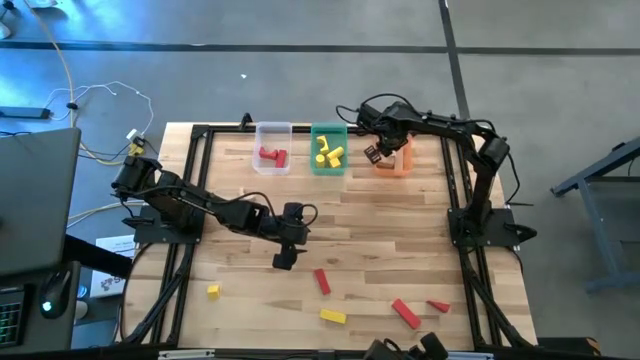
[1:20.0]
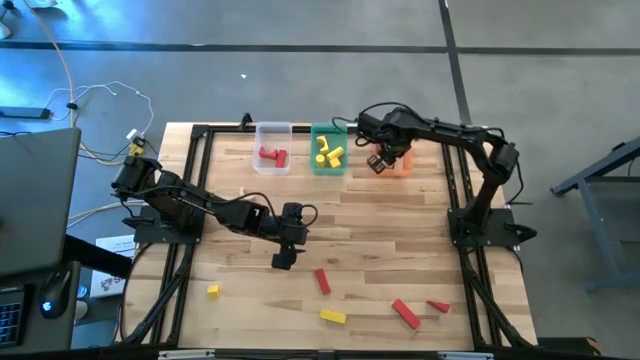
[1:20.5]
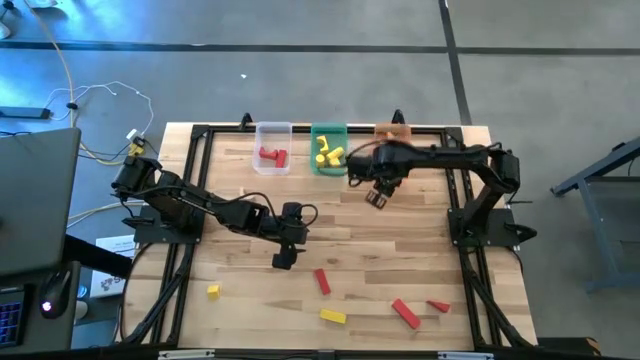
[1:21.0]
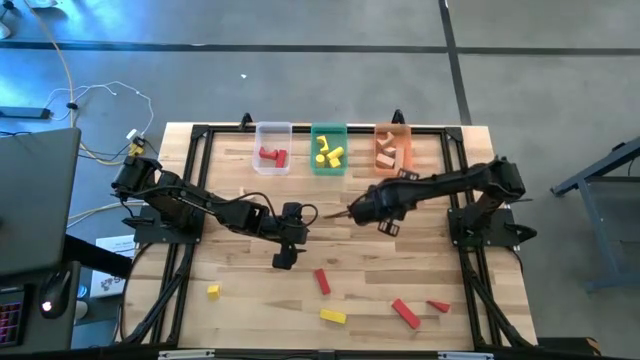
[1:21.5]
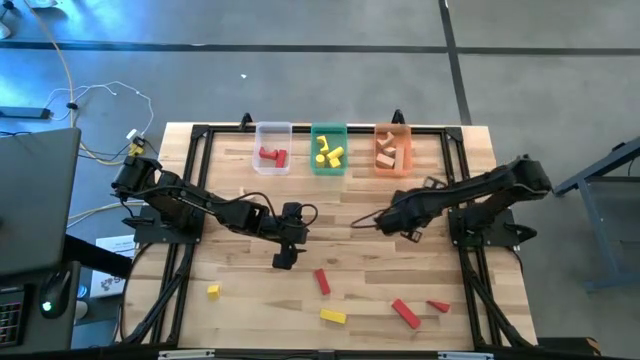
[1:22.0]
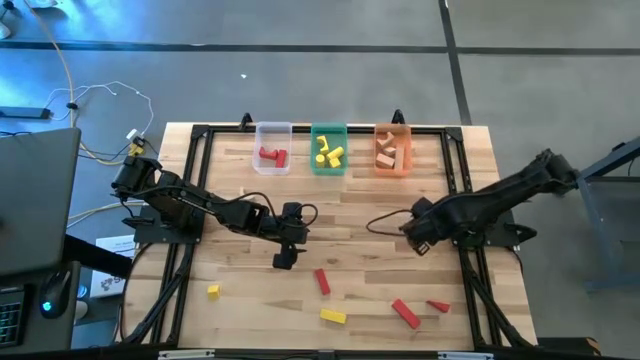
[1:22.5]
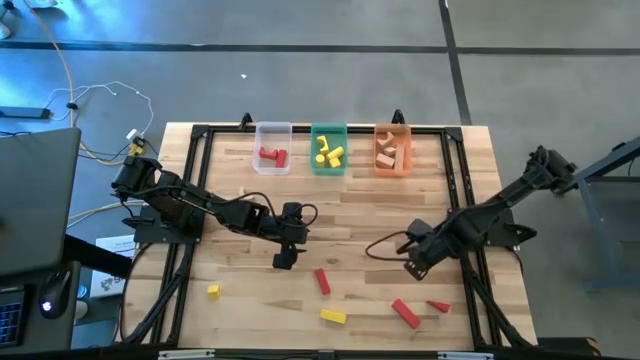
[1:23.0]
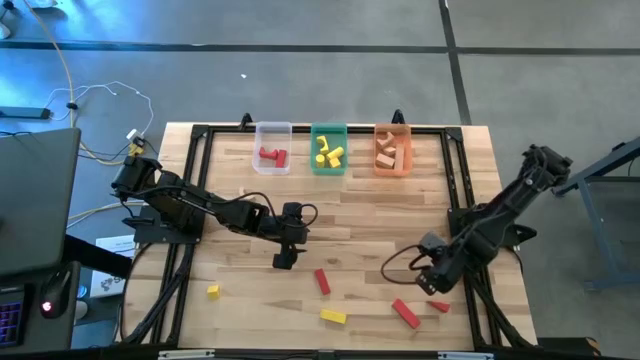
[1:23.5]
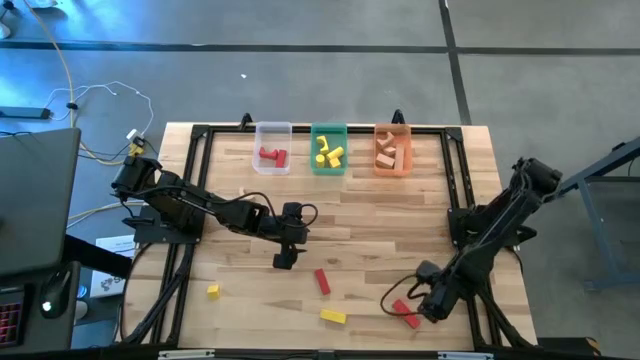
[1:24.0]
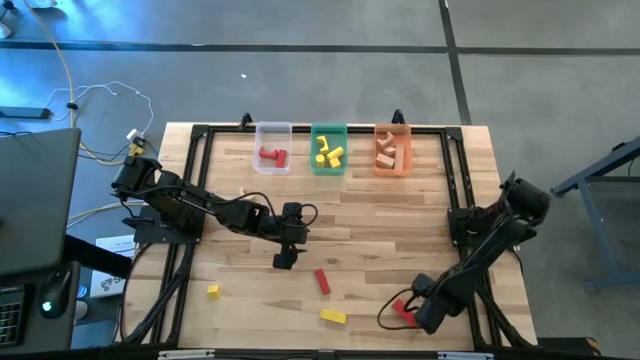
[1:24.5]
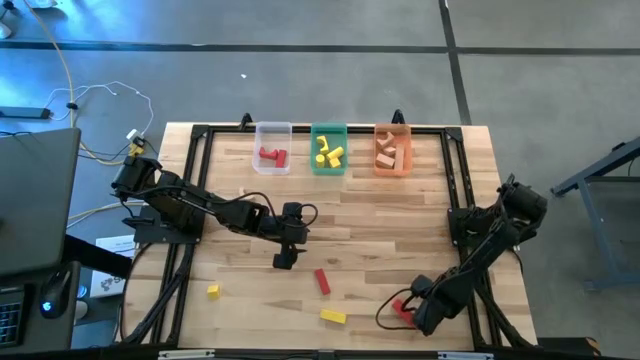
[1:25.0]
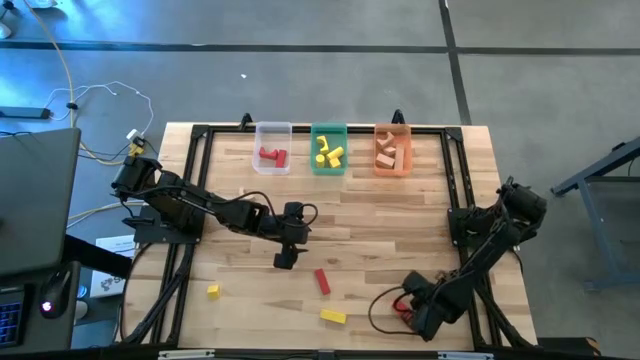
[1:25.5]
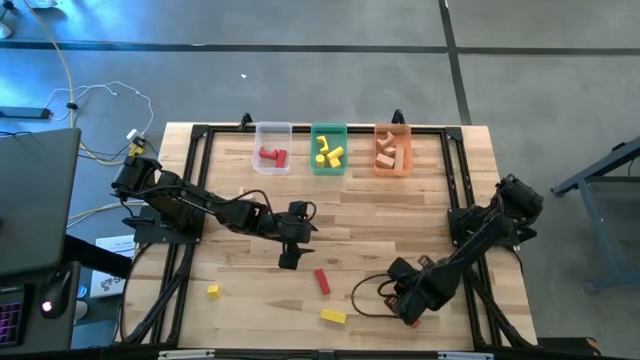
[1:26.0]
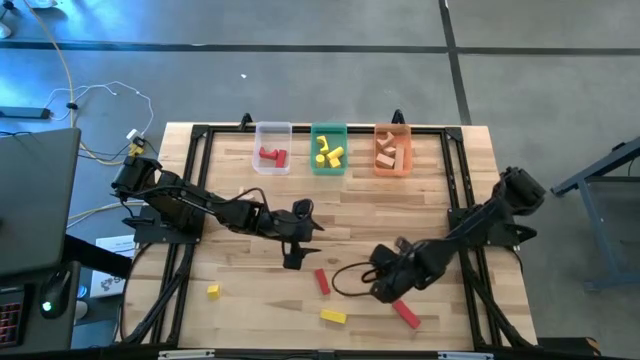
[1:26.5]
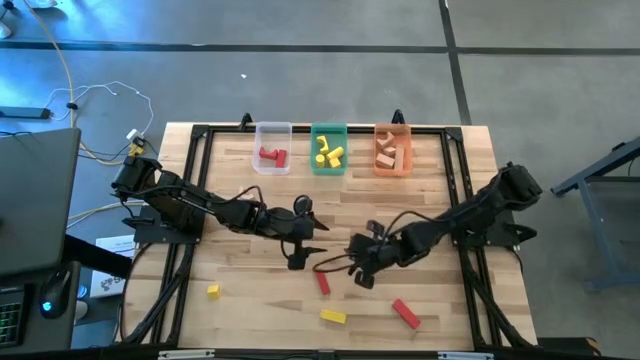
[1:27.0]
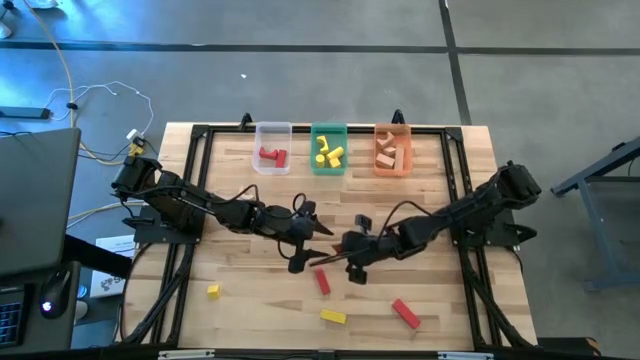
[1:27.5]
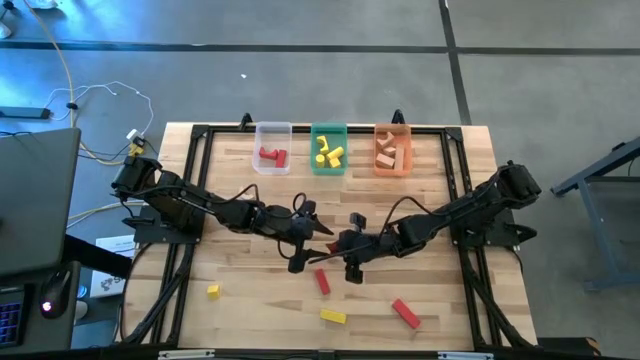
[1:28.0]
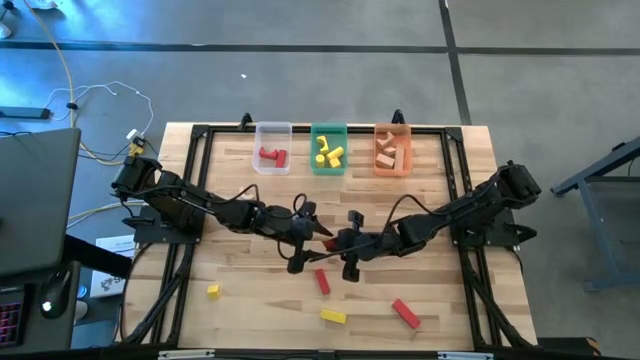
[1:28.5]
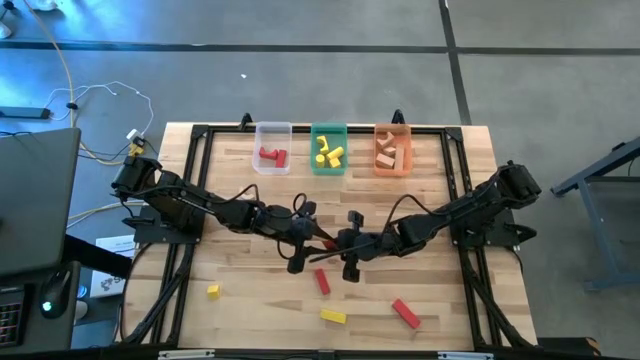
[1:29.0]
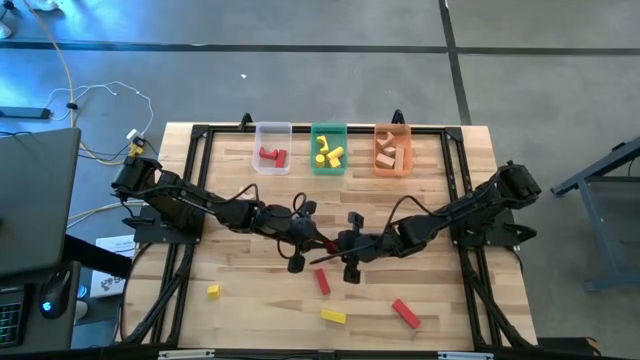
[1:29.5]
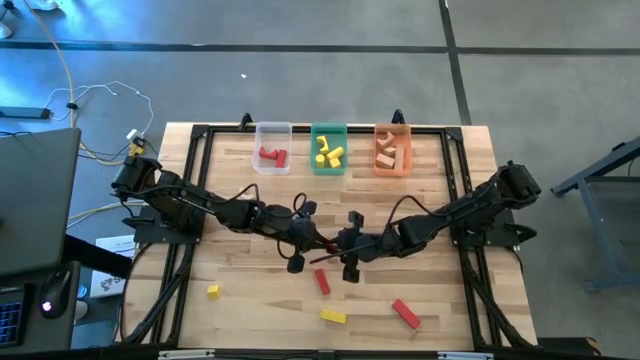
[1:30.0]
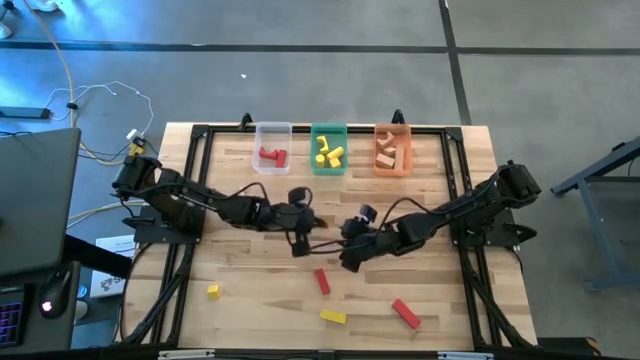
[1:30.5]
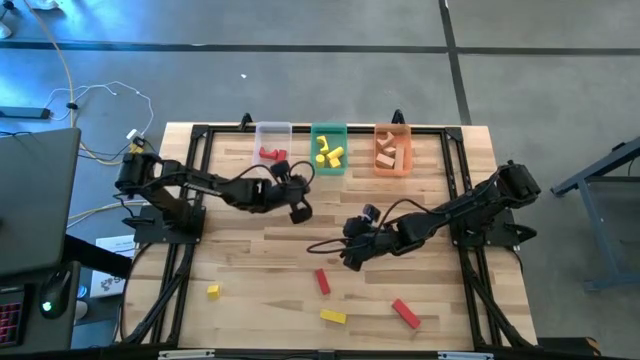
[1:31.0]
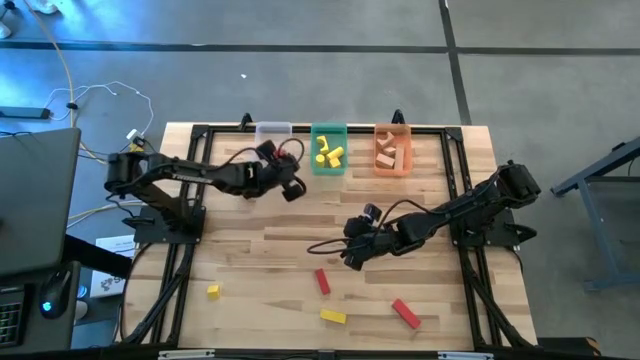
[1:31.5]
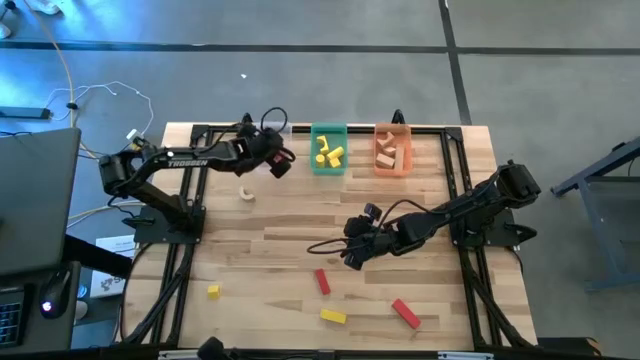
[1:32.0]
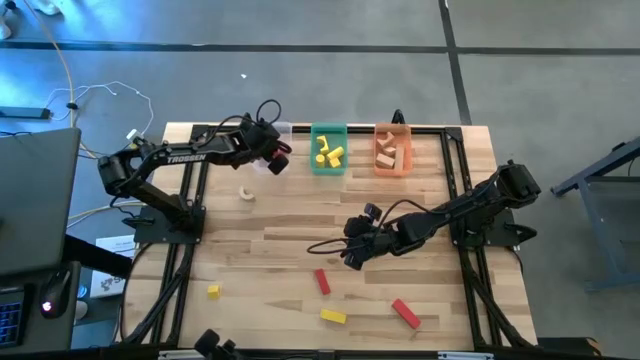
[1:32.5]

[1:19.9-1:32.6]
Task: Sort & place blocks by color
Put the red block into the white bin

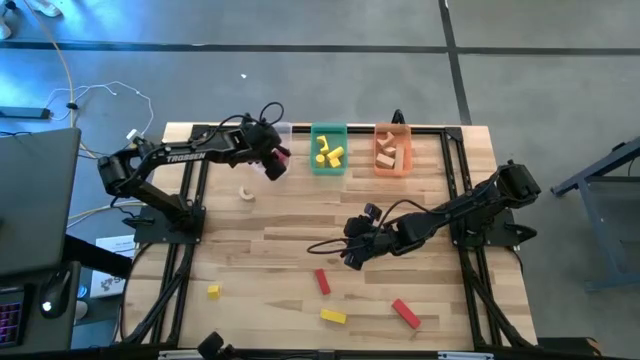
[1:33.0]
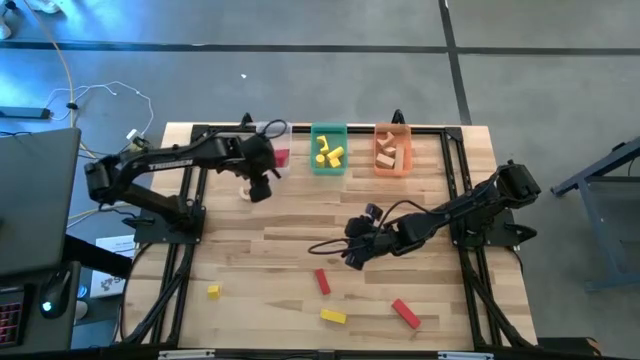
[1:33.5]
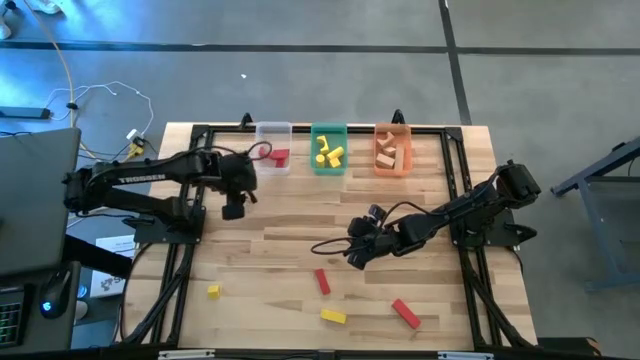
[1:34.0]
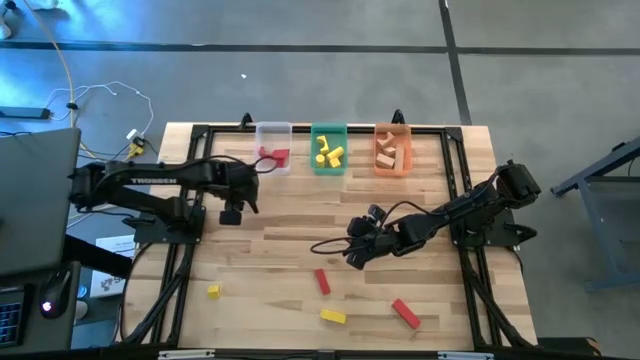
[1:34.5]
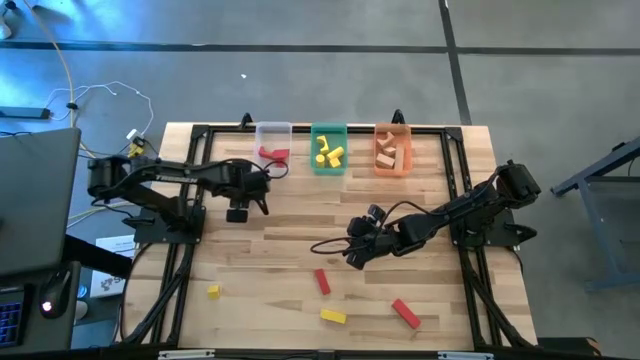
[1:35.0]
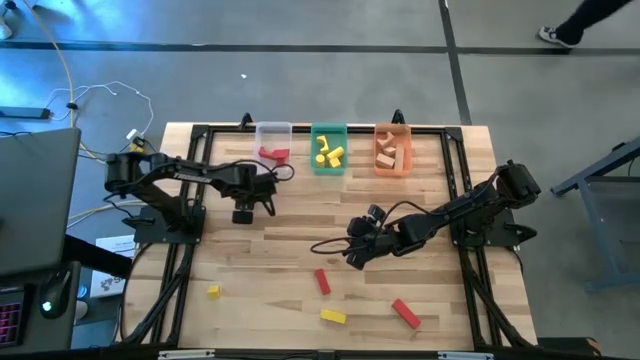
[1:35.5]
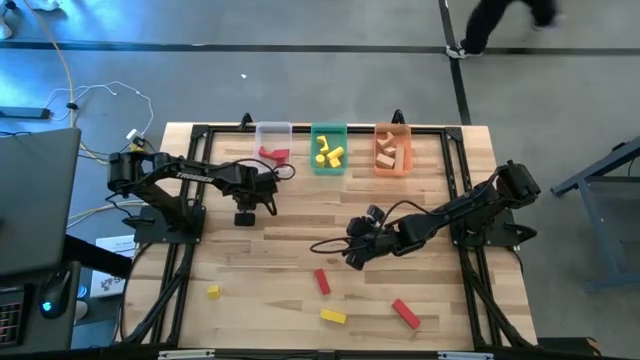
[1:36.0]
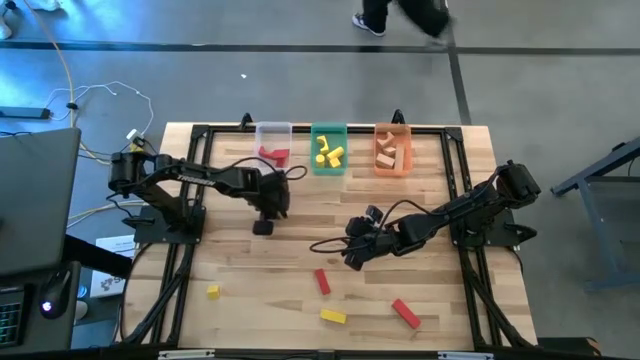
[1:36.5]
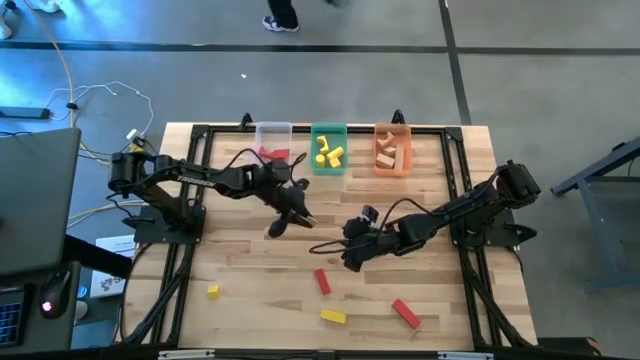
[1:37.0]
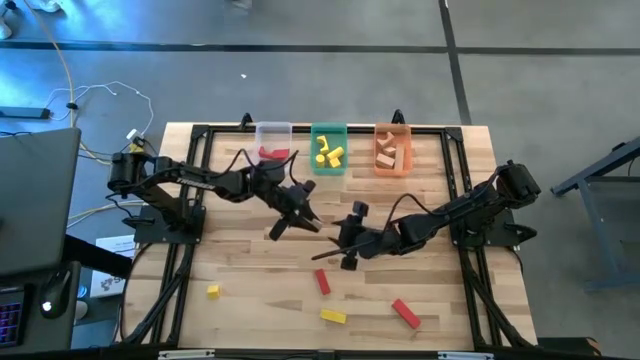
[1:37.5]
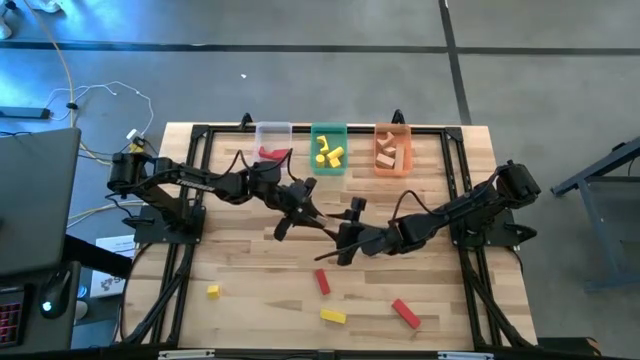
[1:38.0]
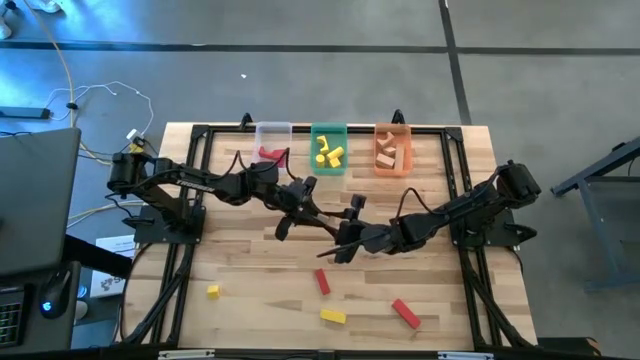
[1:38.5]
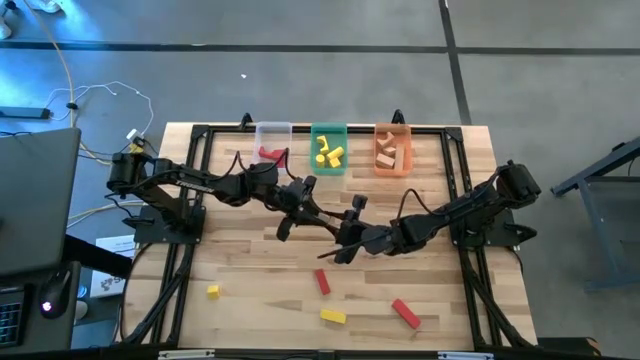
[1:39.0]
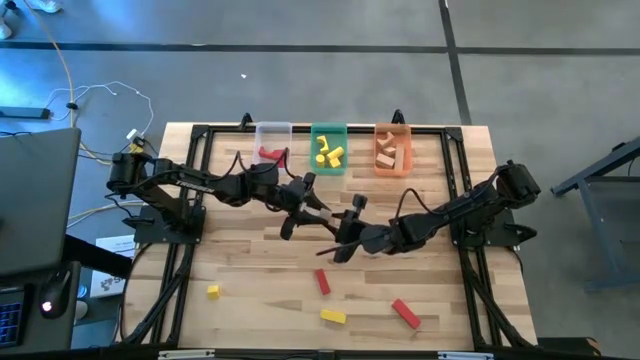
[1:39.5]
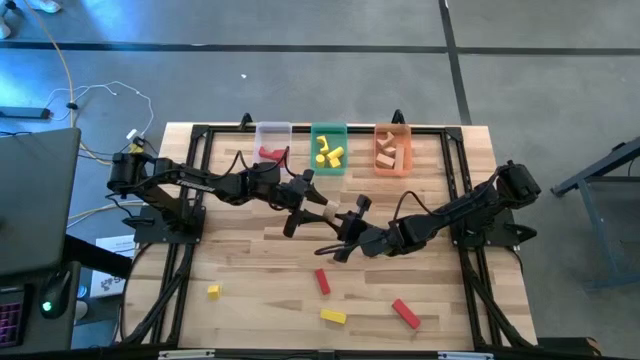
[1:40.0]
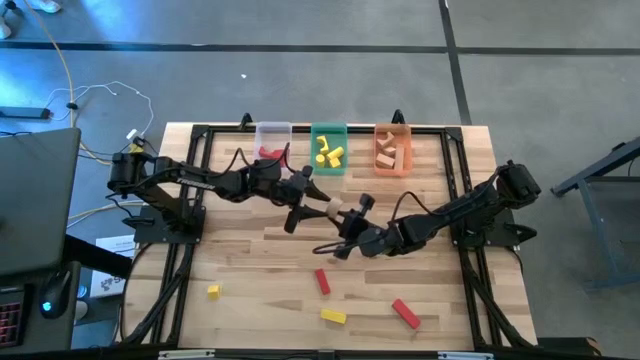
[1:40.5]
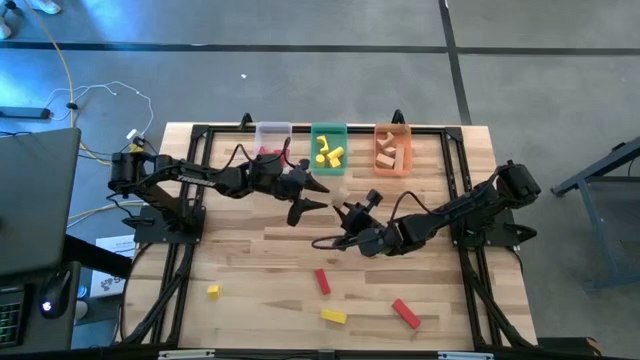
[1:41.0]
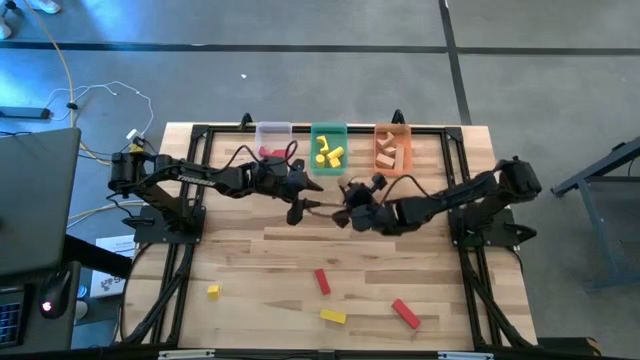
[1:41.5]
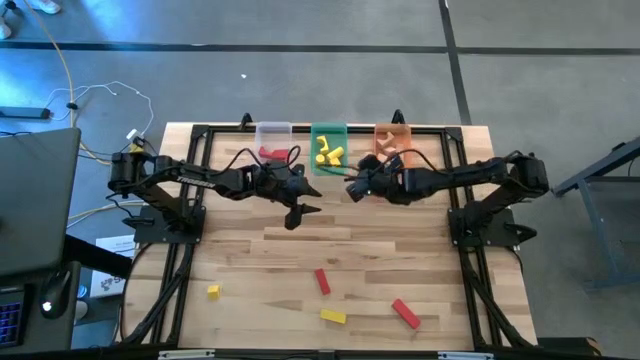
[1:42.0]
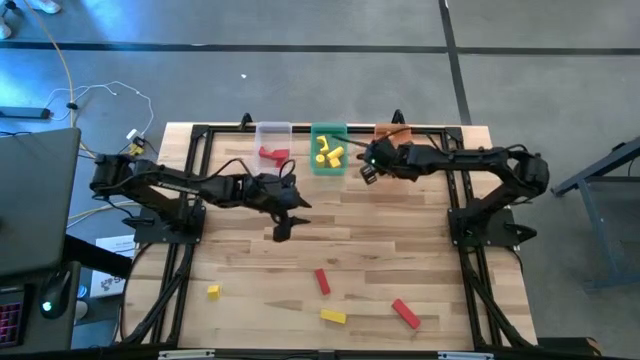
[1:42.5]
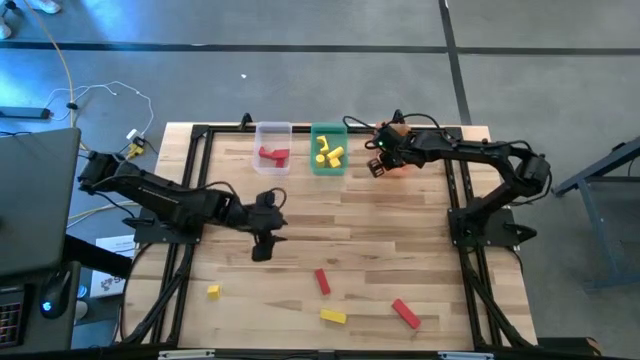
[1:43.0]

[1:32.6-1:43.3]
Put the brown block into the orange bin
